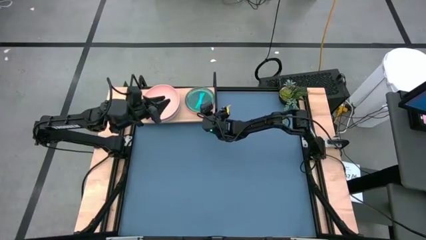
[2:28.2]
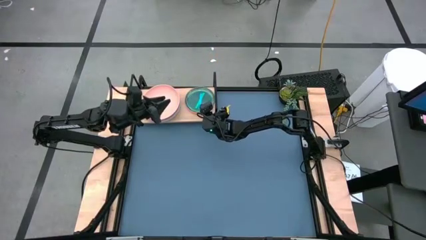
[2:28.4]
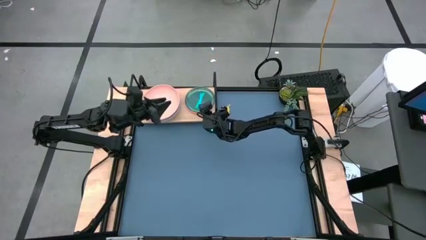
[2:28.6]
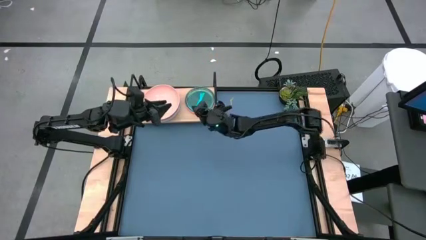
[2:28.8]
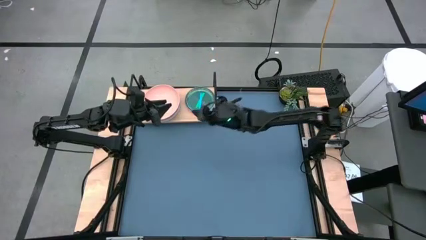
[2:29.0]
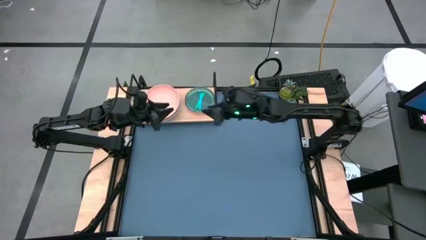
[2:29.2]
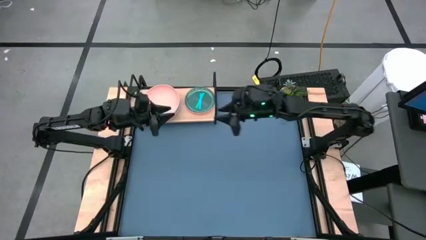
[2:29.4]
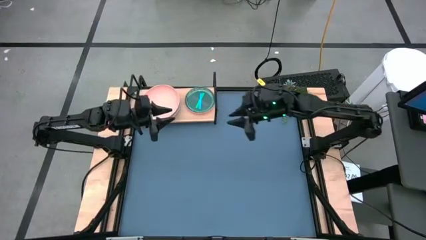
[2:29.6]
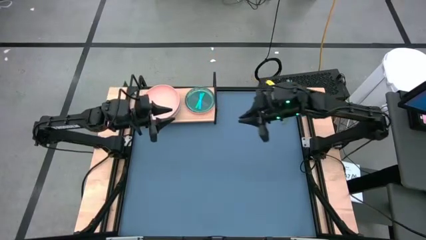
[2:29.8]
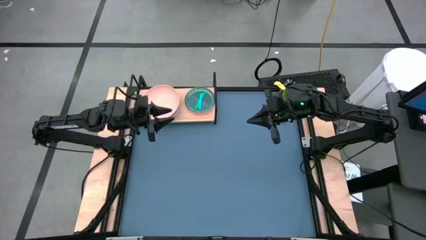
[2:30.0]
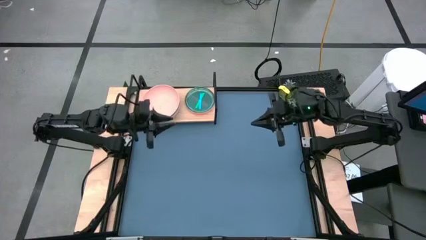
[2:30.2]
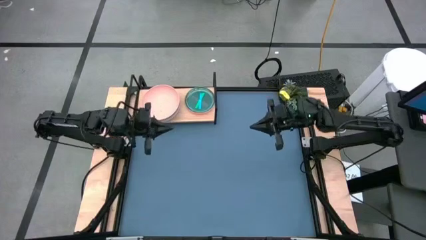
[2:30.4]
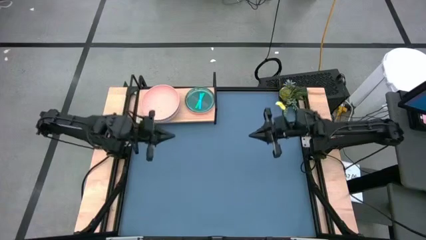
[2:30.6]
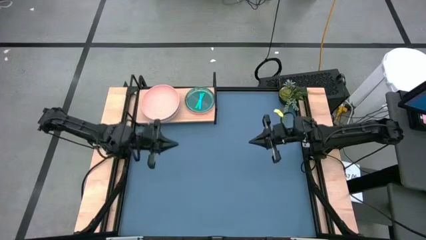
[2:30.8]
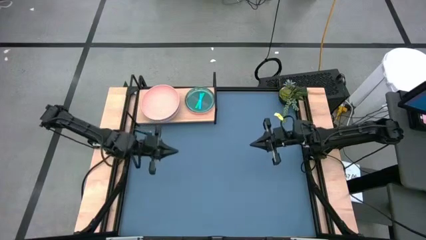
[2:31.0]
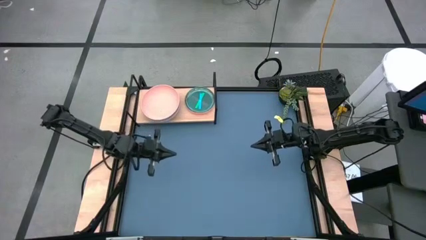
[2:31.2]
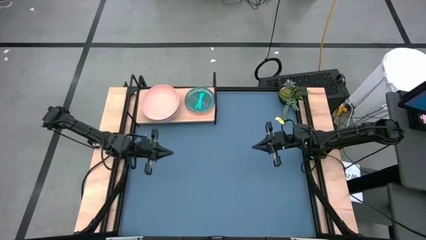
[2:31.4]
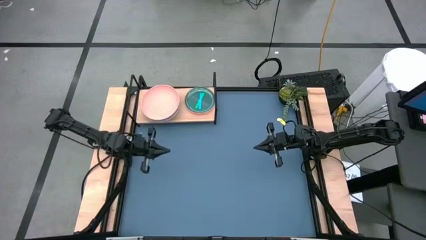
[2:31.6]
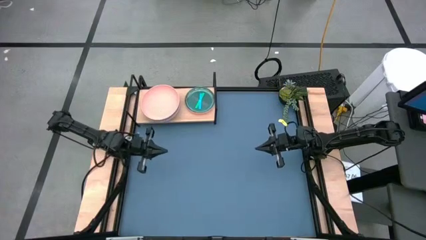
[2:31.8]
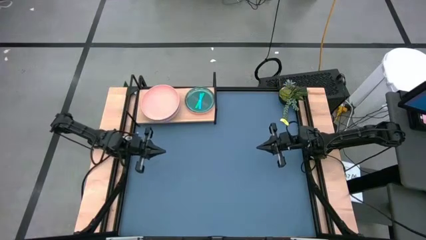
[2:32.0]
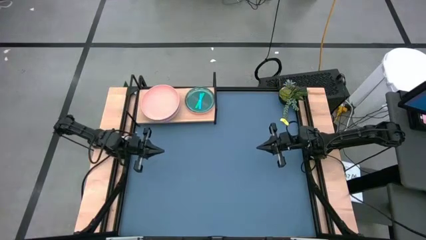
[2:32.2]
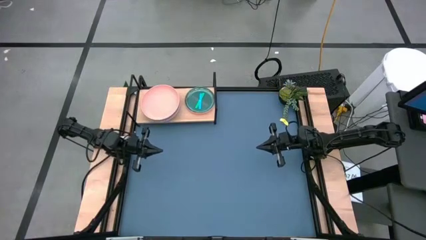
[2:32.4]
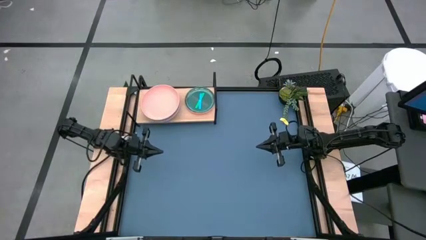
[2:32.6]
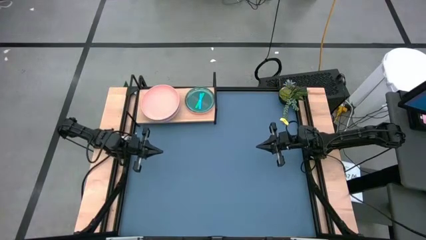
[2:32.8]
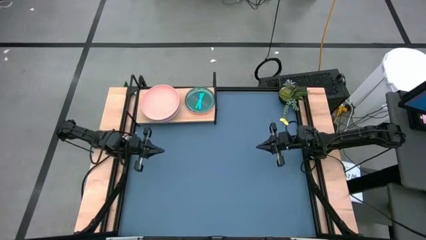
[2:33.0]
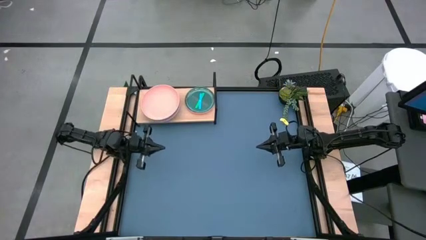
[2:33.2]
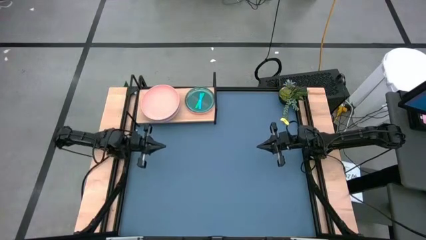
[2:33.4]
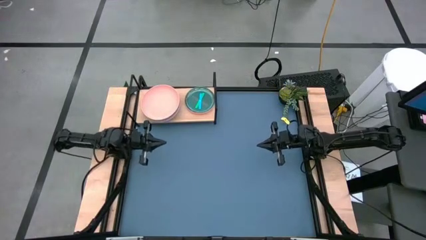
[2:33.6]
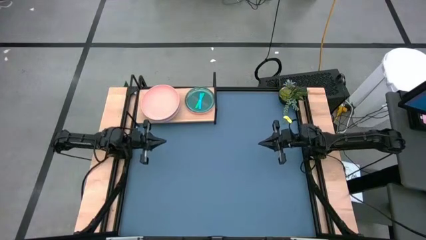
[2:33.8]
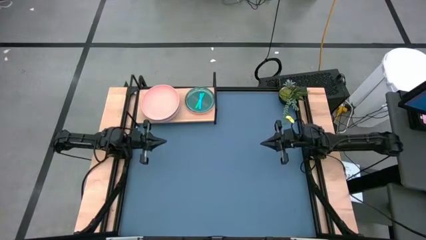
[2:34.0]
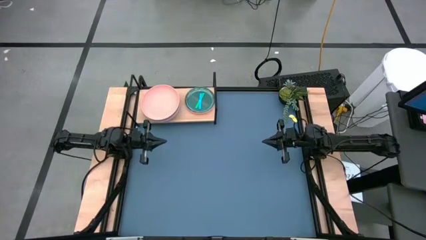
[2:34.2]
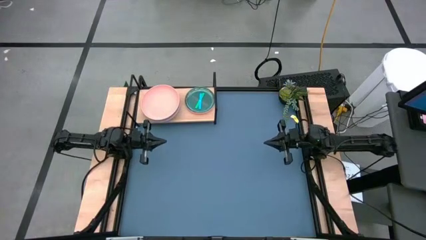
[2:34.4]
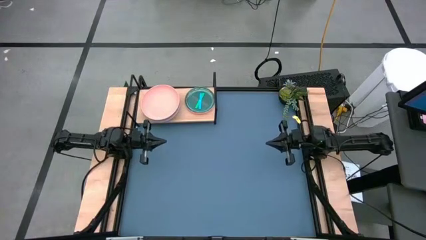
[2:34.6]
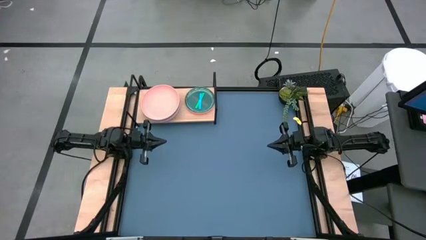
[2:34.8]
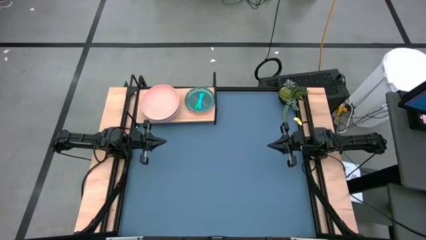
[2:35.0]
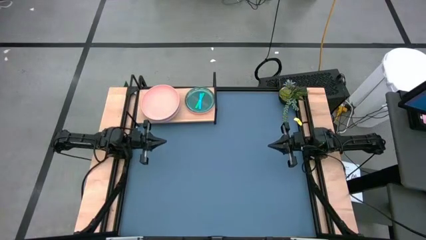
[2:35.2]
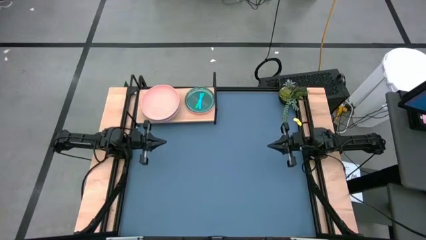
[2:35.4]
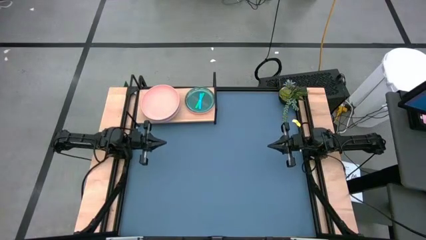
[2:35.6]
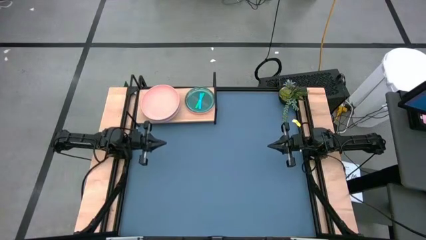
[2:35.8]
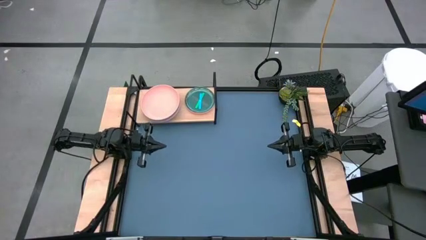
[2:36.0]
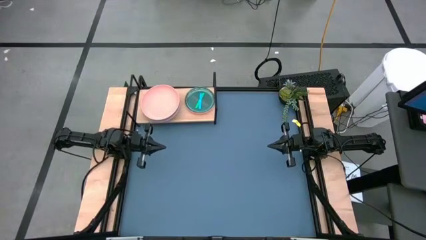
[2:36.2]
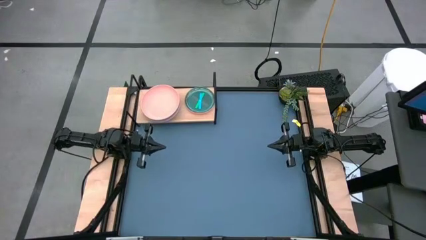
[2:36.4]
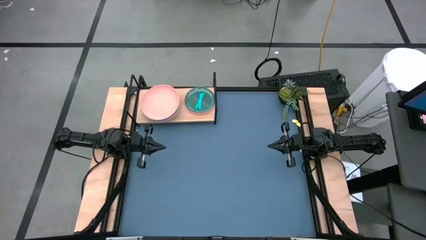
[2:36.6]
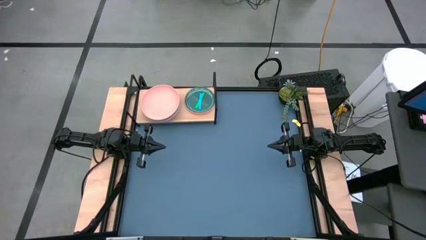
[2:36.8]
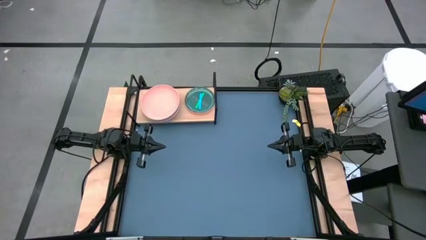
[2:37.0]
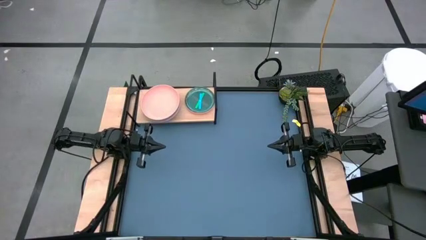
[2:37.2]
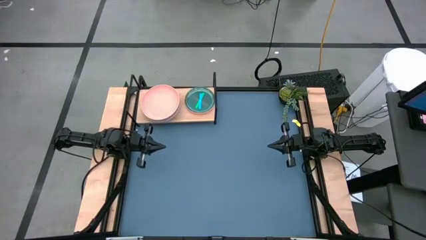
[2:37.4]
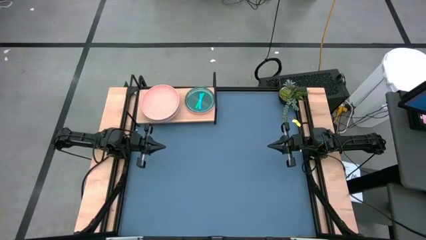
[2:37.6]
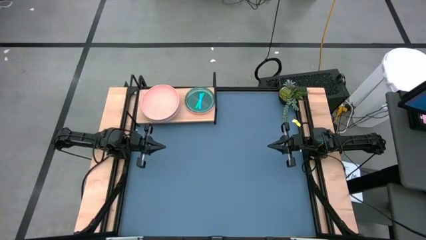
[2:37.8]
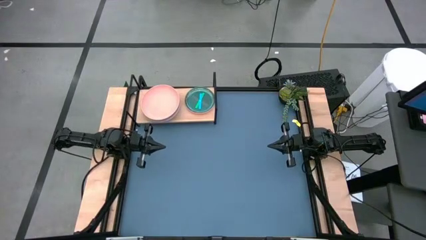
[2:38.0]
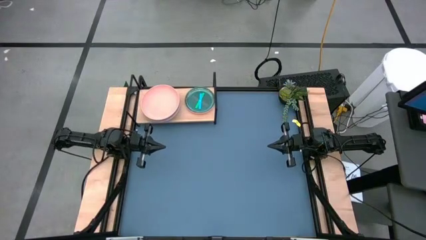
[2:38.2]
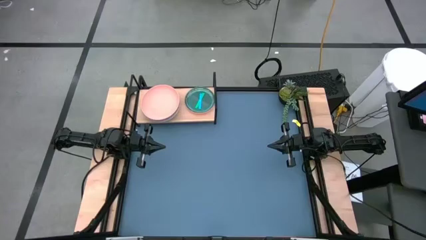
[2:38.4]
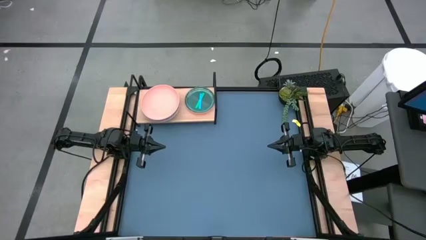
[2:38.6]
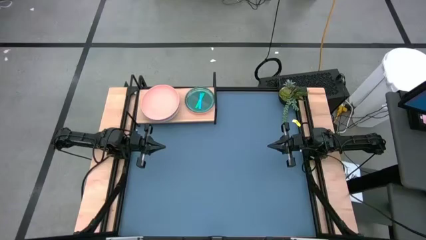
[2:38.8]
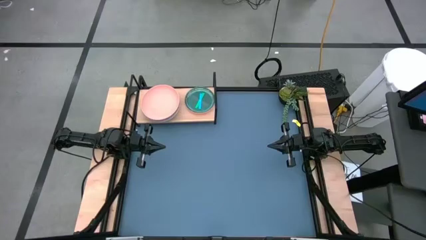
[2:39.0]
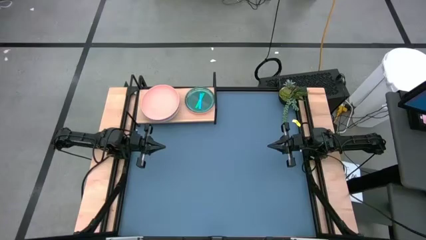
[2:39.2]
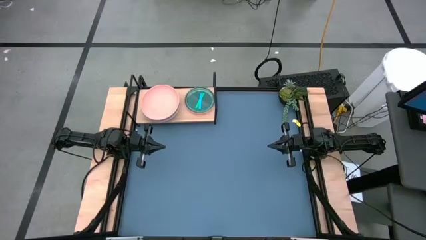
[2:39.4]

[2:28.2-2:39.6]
Task: Place and stack plates onto a shelf
Return to Home Position

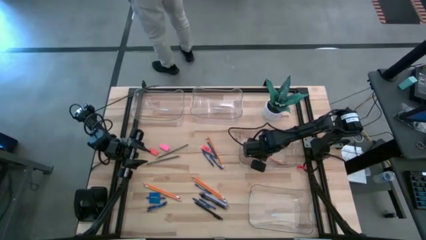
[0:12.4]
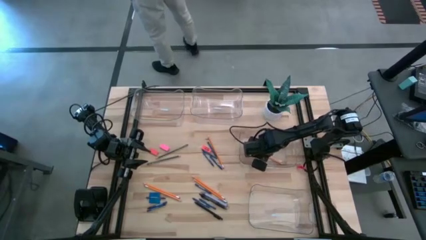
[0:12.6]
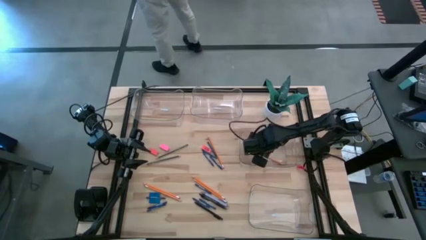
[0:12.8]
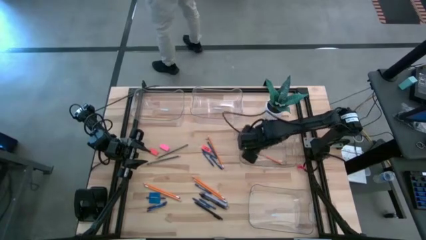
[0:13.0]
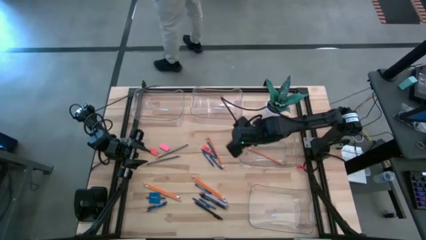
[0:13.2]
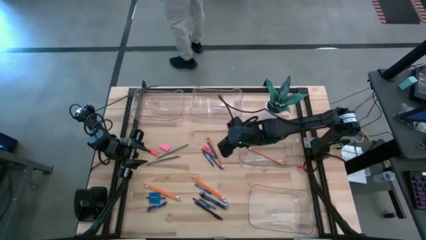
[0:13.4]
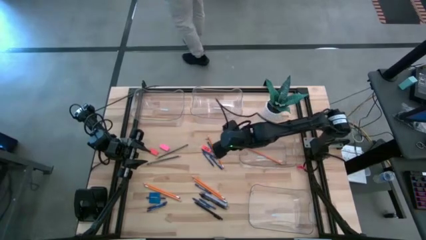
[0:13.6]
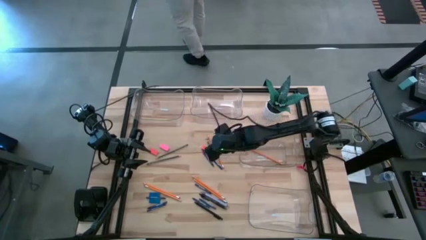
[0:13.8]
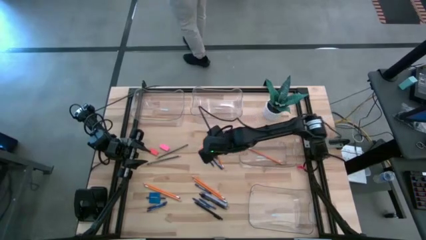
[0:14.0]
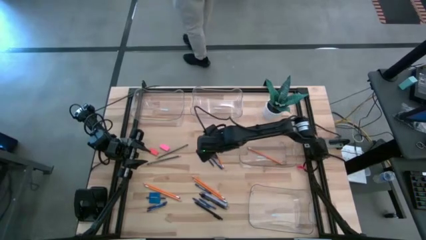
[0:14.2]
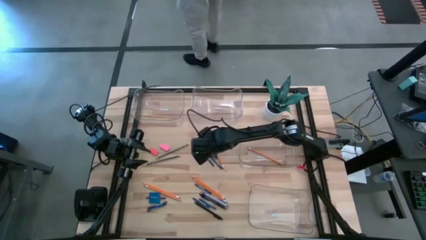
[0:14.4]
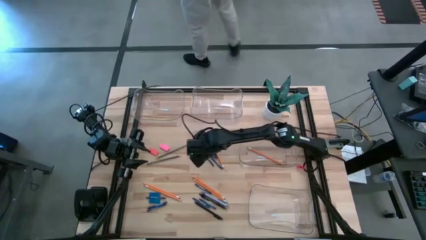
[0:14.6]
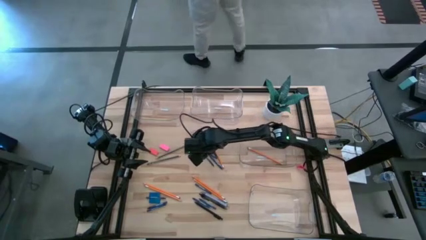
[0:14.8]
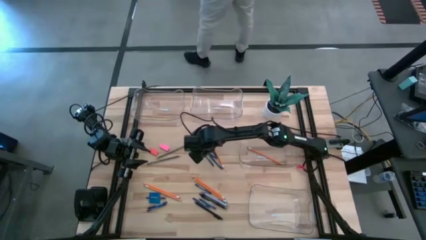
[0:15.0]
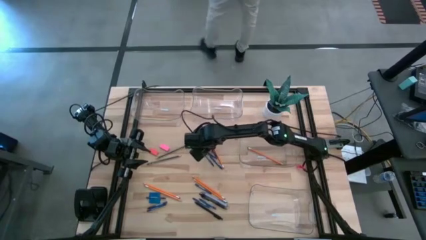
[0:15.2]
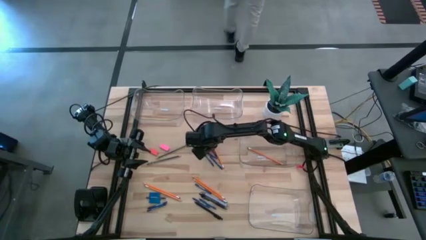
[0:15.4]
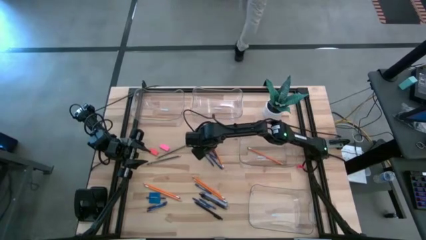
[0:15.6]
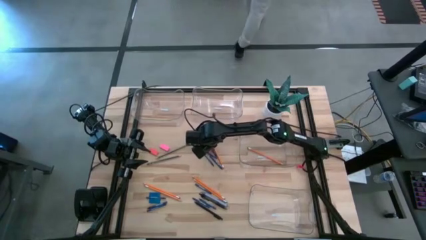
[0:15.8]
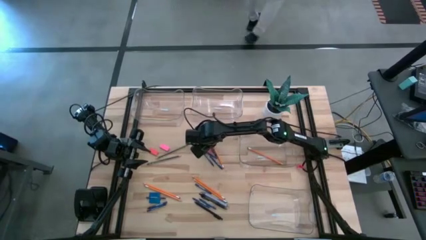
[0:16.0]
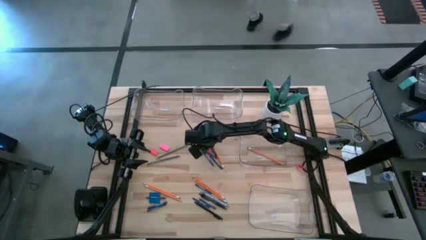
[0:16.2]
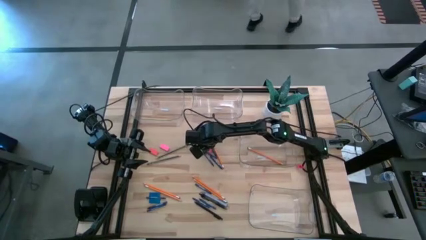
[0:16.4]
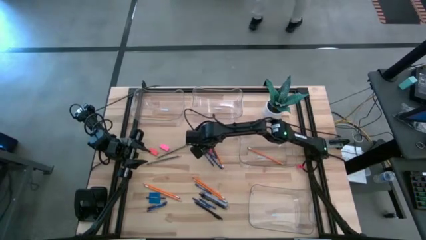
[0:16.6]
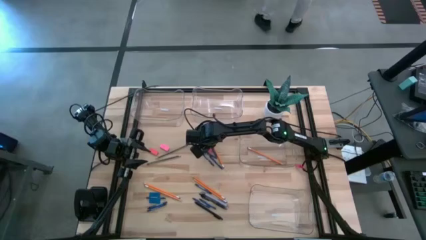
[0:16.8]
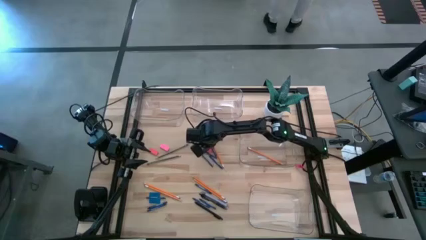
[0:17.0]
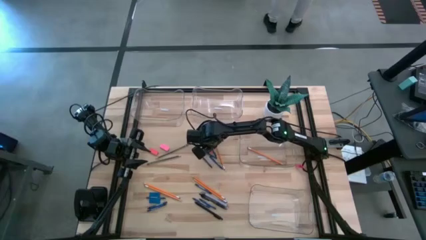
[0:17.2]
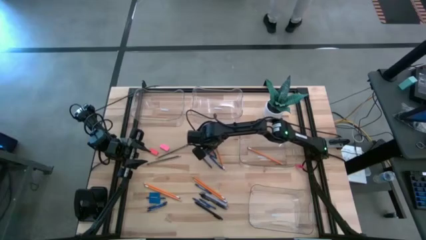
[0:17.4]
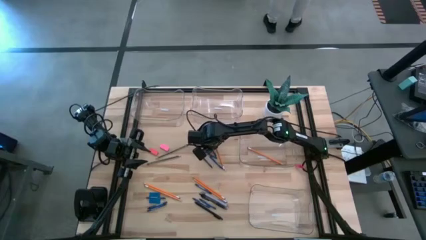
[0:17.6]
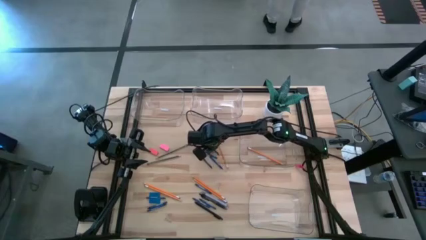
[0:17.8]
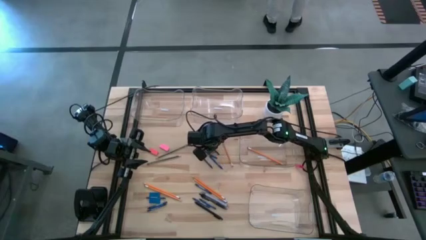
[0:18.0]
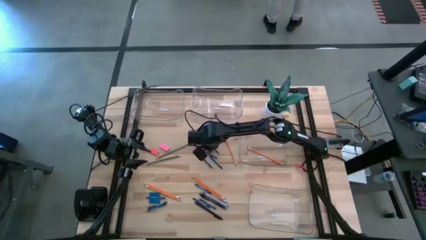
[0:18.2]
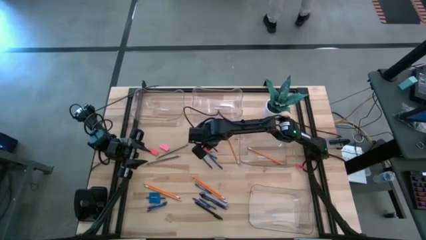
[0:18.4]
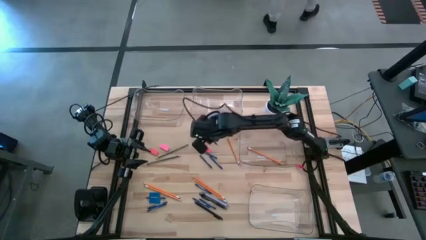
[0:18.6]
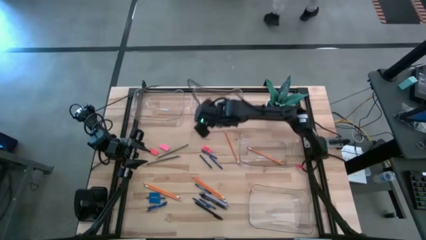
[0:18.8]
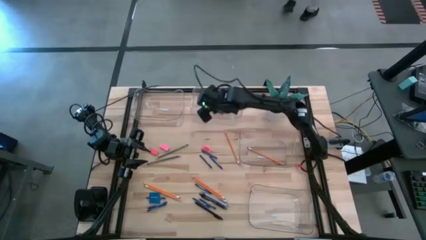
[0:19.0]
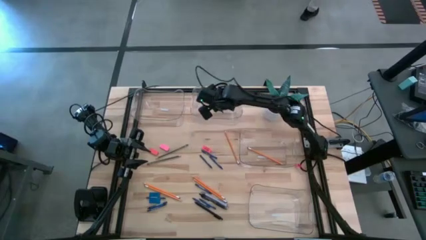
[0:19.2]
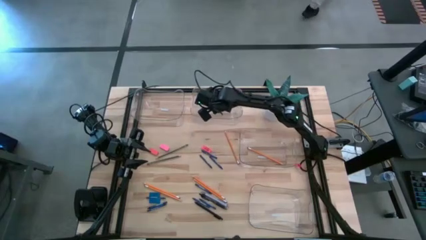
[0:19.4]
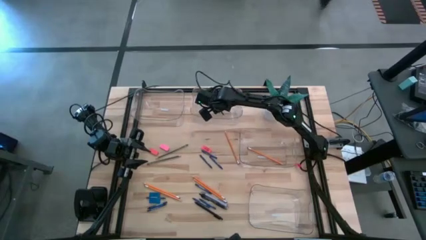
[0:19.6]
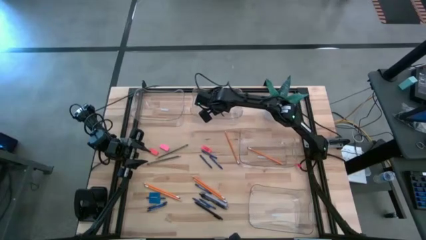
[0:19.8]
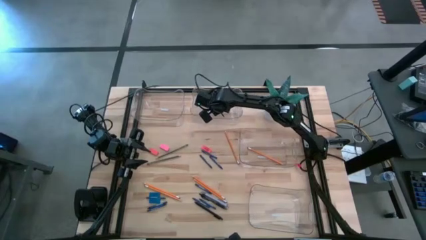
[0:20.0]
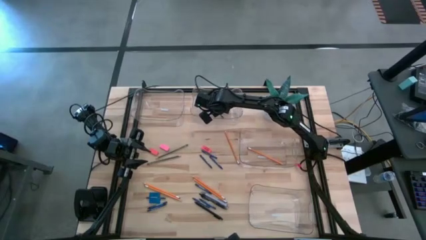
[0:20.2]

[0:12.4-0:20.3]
Task: Sort crayons/erasers/pens/pencils in bins
Put the blue crayon into the top right transparent bin
